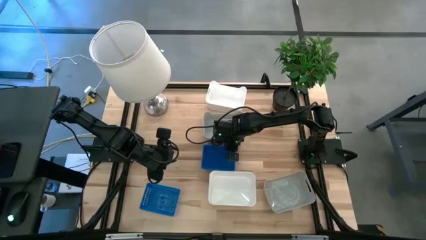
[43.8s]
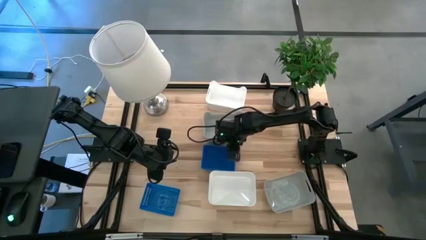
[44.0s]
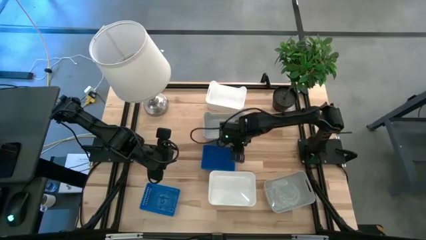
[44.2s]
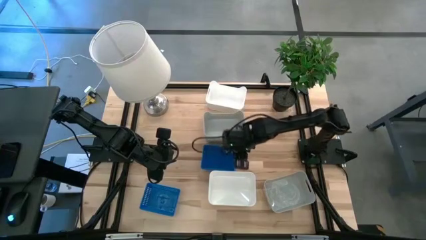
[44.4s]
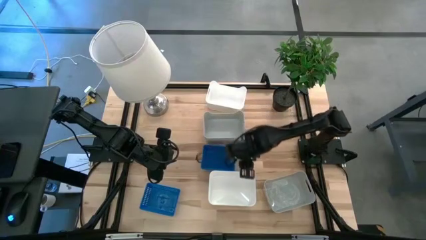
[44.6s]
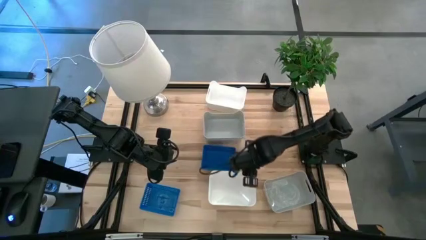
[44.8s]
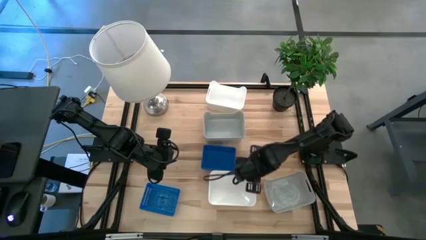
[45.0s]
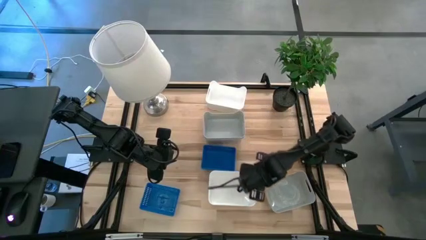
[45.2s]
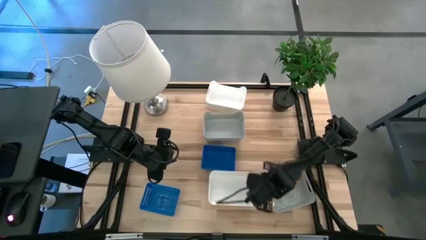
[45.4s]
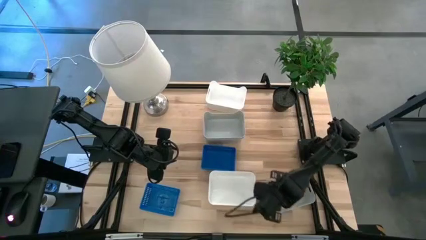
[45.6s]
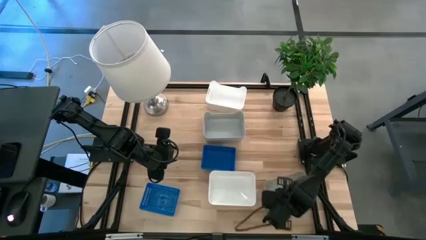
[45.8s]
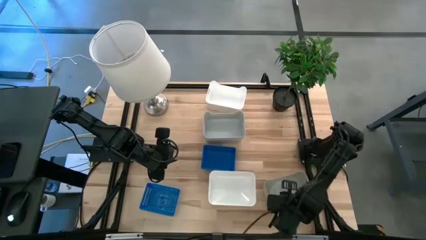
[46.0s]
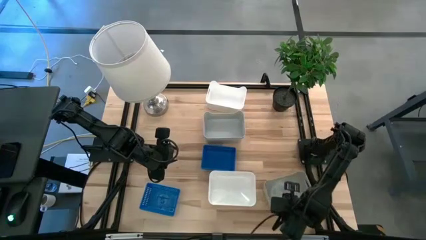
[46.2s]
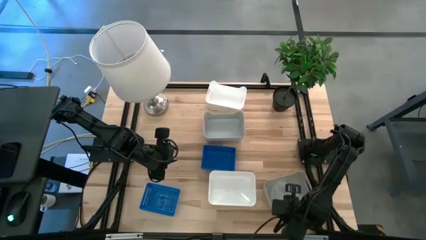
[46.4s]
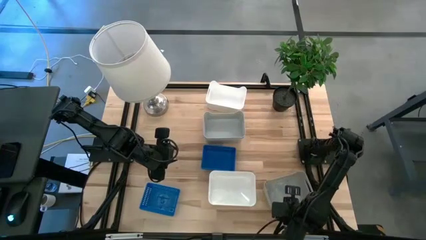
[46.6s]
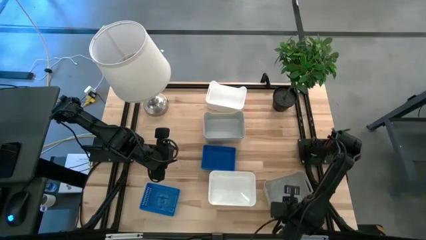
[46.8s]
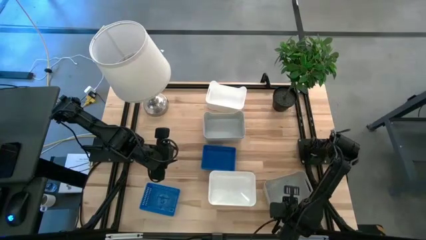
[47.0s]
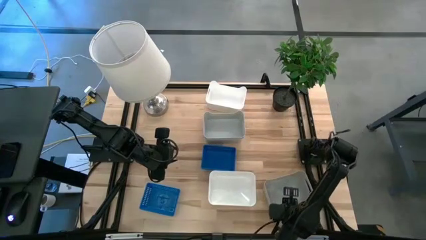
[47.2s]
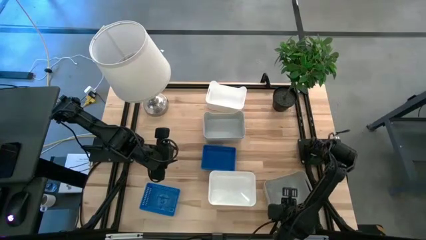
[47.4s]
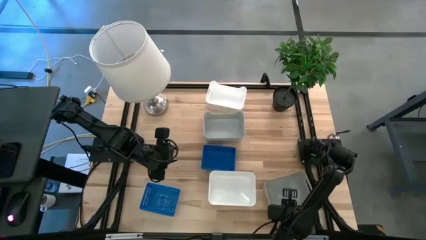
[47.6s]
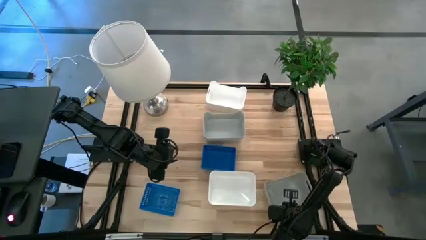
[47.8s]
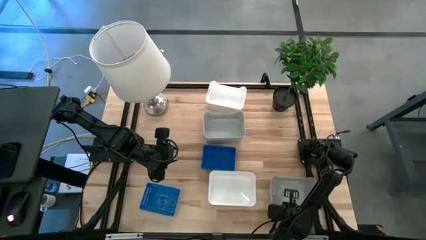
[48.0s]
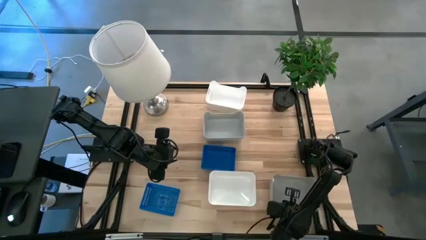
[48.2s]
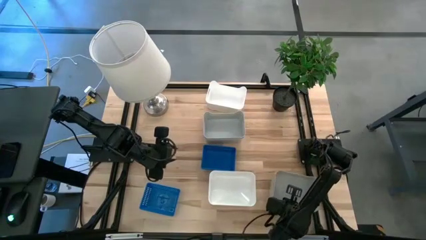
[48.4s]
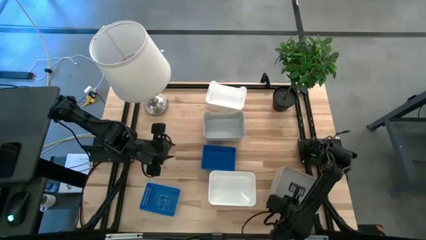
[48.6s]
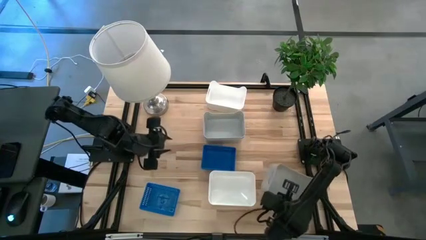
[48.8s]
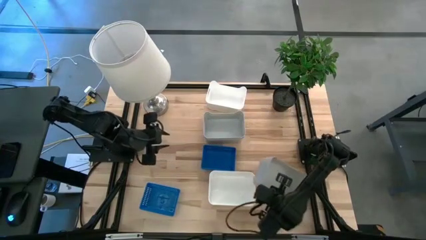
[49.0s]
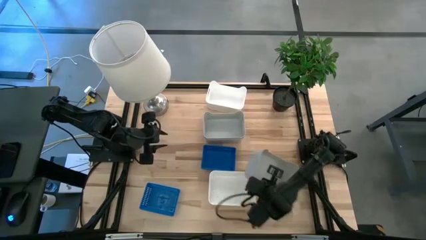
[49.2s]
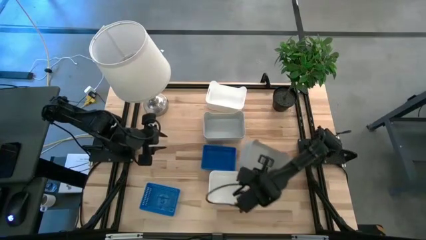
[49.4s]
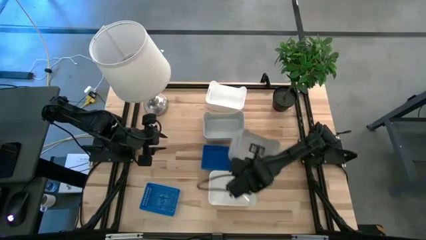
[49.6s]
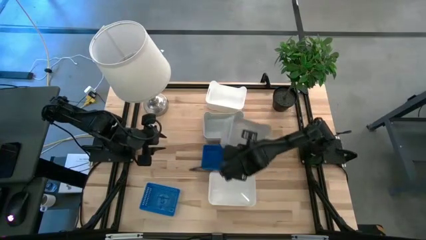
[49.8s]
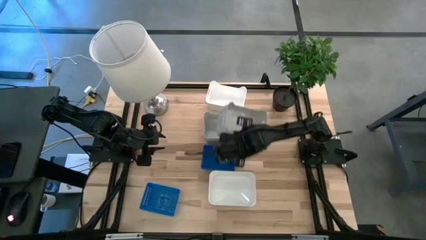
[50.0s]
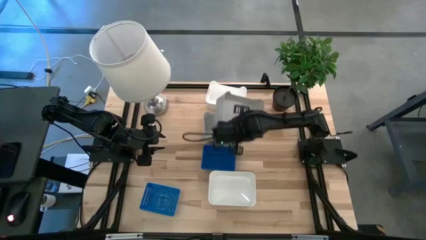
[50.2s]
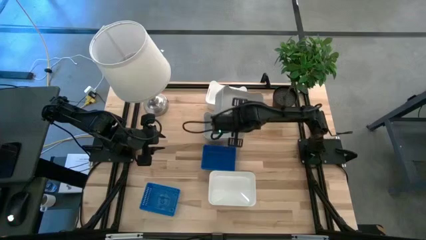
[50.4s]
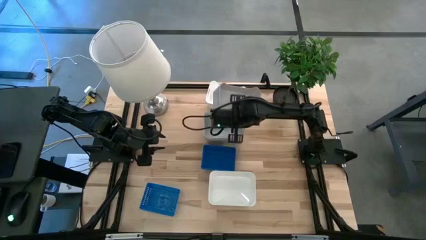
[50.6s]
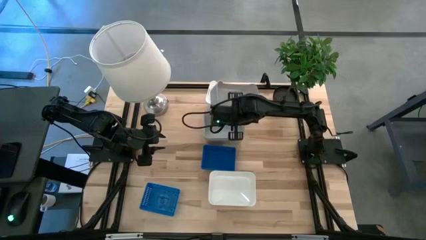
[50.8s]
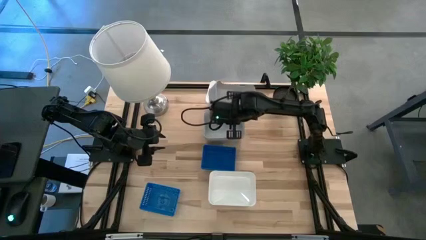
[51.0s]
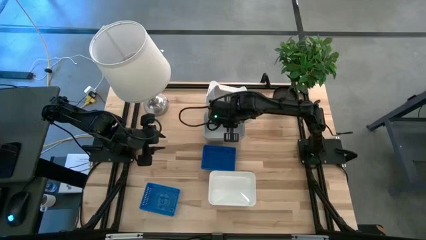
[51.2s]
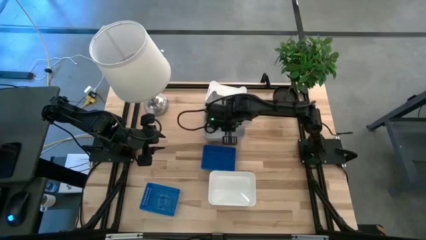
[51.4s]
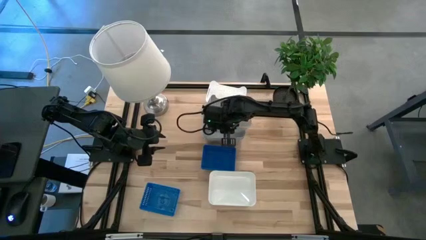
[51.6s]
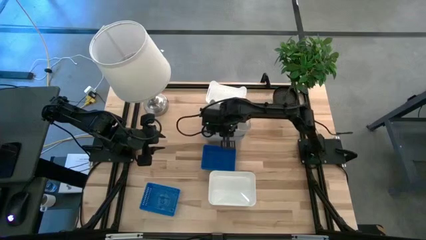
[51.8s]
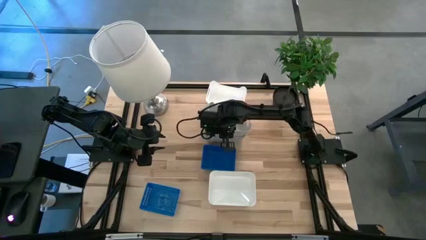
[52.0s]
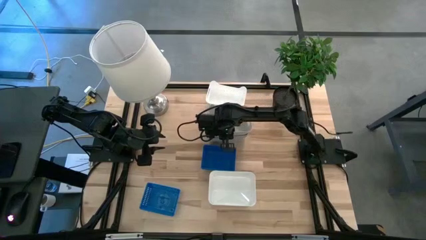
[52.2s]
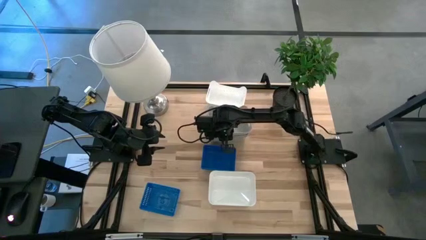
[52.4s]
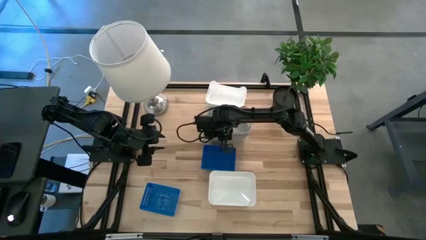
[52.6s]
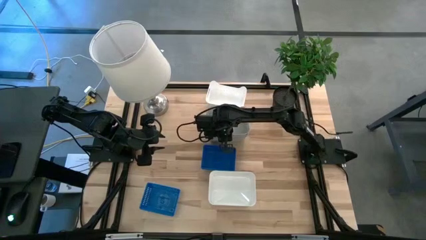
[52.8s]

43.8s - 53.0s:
Stack the bottom gray bin on the top stacked gray bin

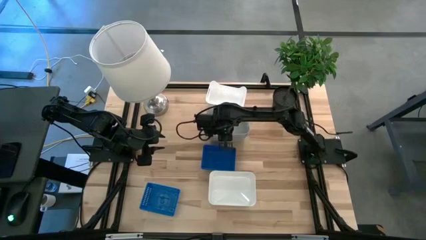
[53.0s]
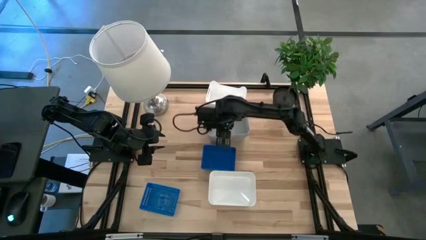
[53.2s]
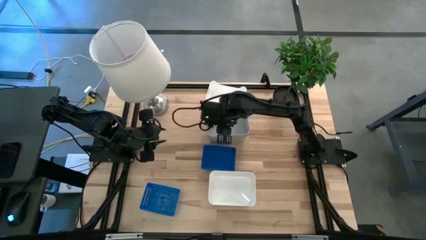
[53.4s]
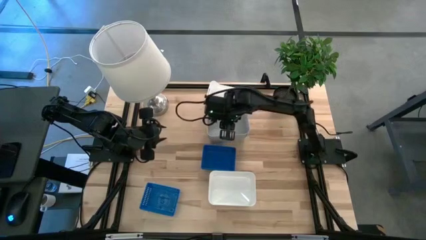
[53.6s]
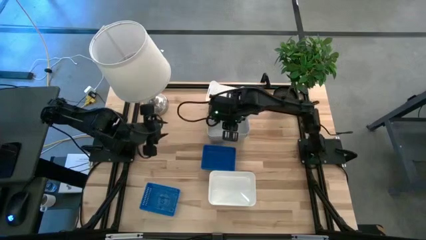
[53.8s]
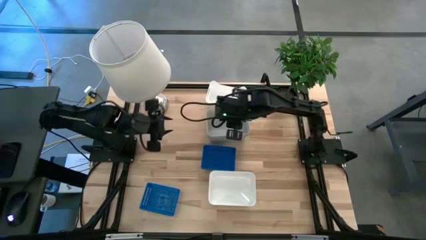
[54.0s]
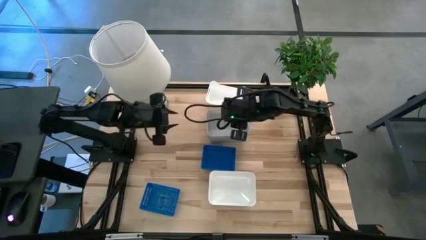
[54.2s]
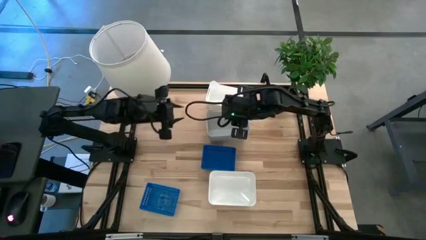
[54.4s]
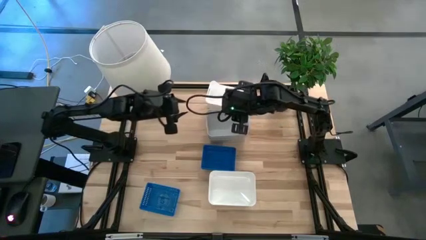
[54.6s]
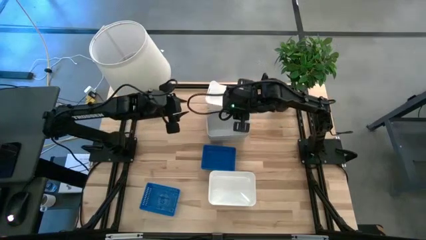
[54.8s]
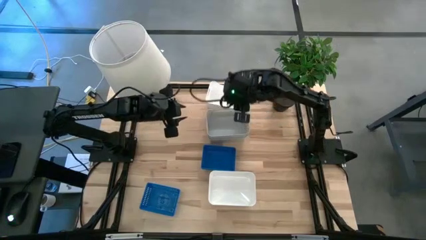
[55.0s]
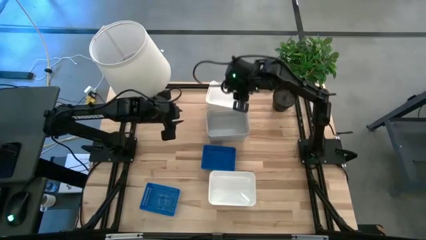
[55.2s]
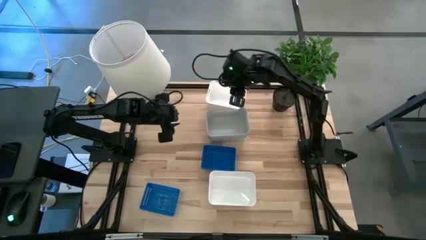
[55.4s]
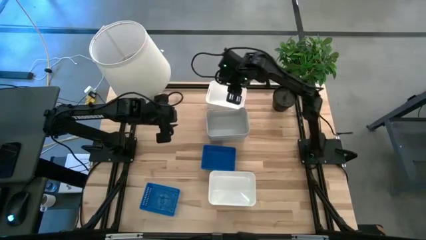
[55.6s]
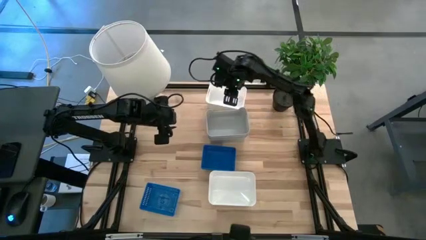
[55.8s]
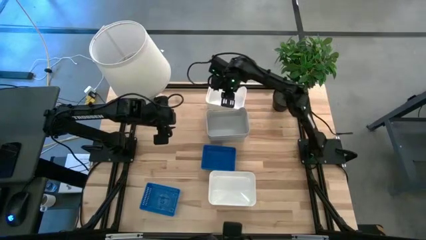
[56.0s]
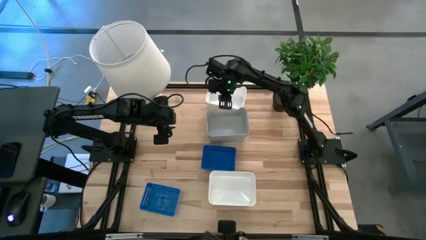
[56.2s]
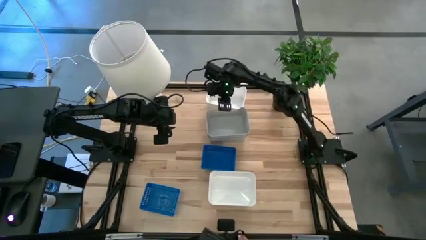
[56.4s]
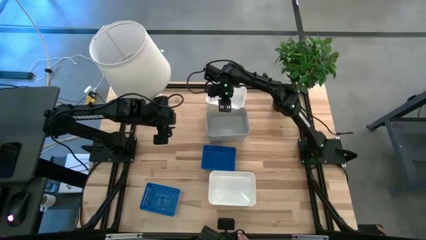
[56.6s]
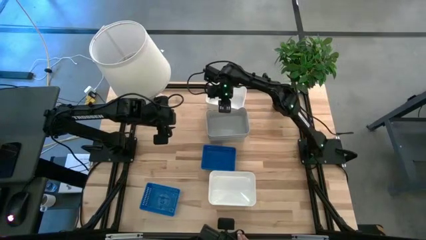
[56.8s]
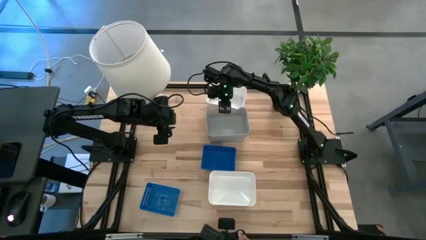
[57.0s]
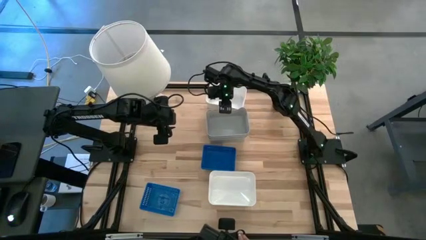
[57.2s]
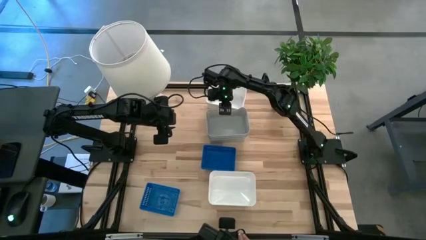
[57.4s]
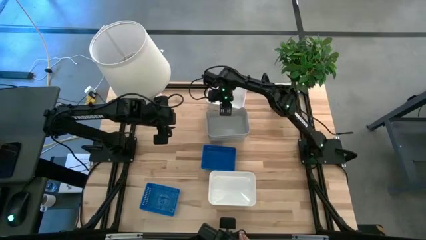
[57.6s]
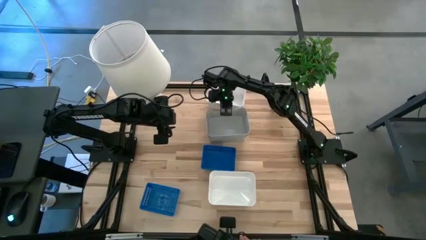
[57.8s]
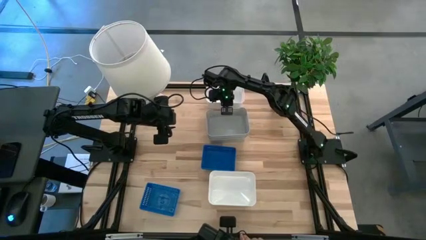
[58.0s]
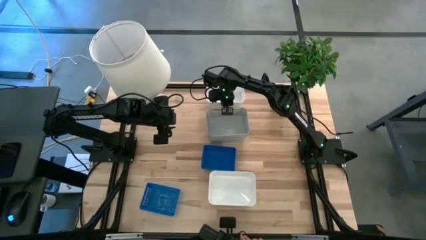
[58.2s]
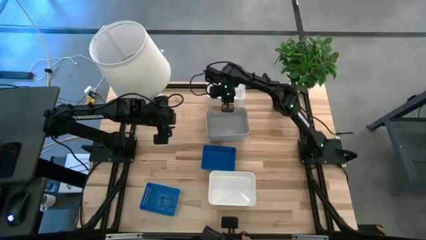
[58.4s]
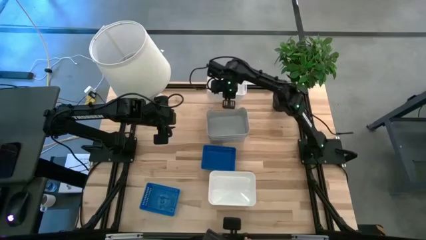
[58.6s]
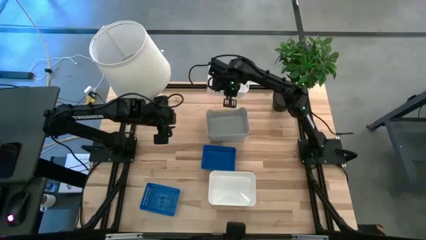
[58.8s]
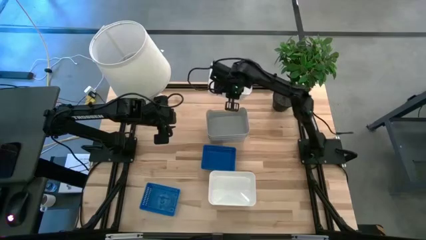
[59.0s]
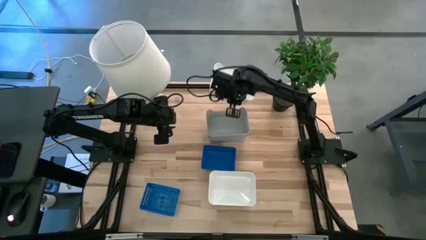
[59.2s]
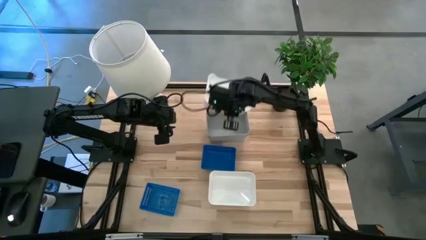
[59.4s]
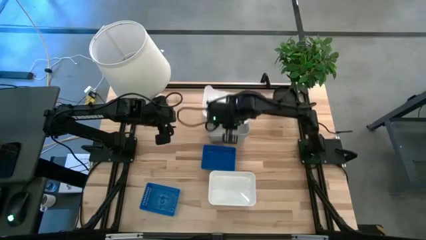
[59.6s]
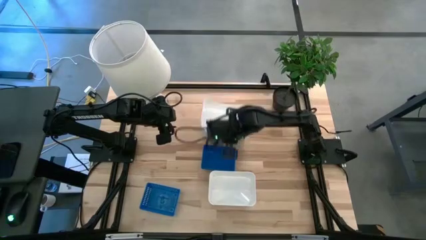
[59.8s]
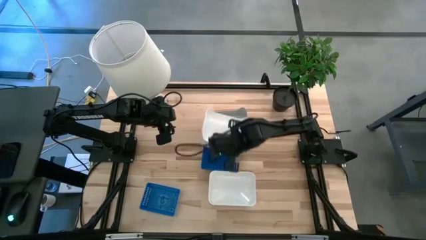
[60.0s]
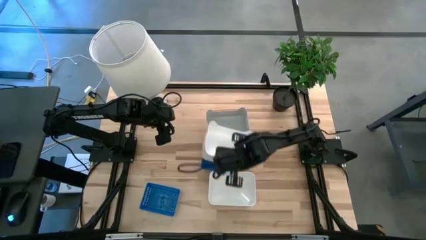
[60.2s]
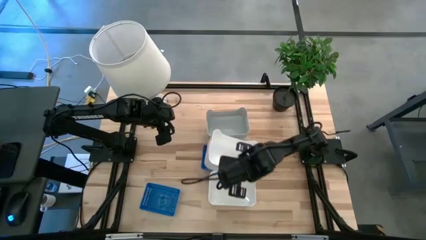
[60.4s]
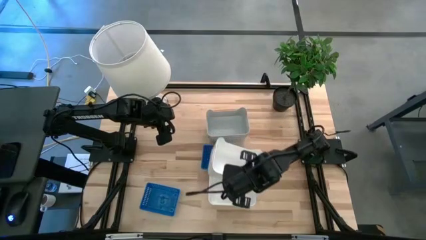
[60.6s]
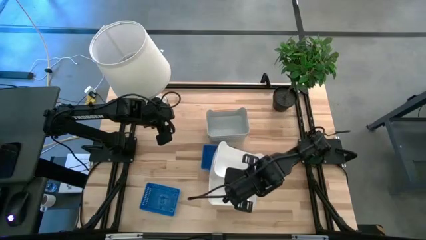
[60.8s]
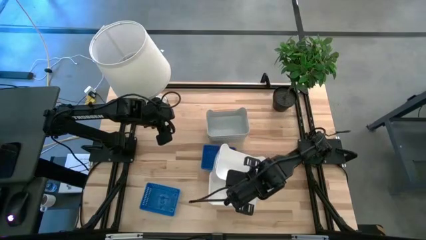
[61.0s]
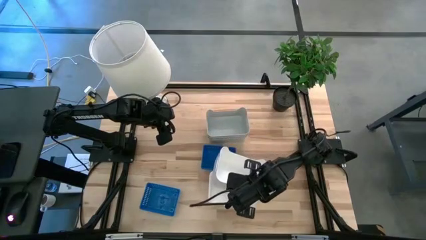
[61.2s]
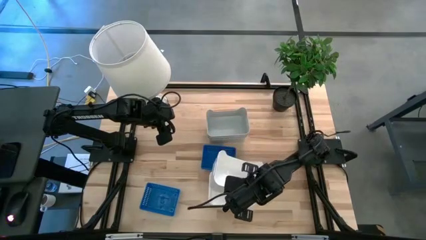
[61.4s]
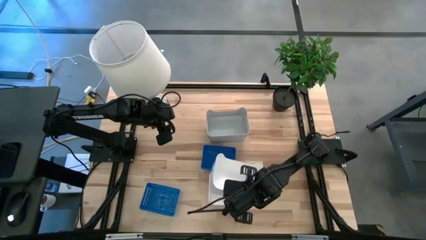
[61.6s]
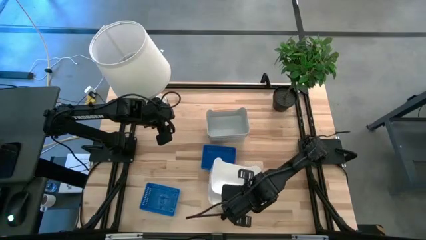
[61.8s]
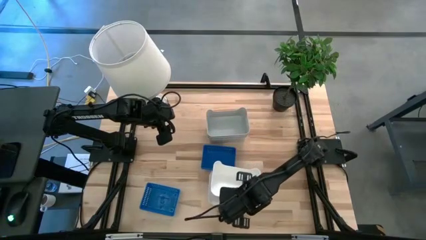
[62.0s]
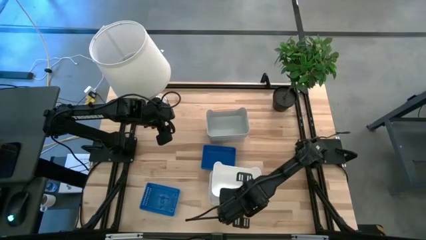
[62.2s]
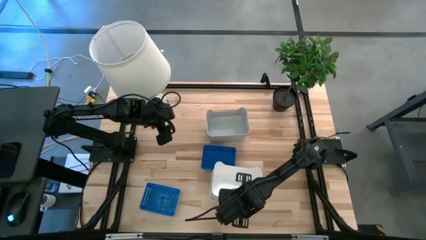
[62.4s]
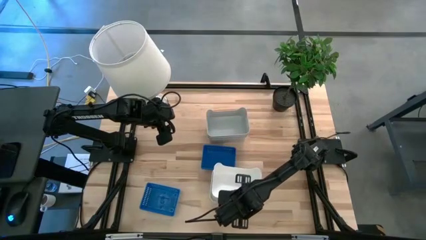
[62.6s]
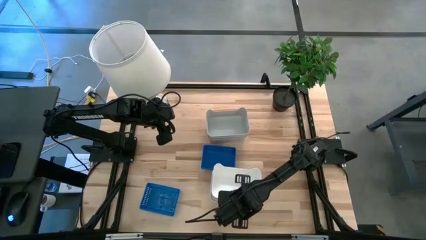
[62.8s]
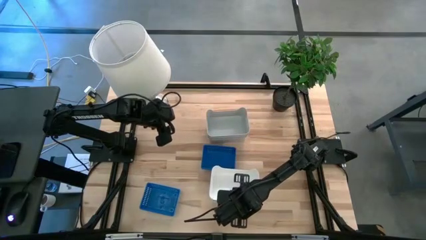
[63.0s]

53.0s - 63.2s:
Stack the top white bin on the bottom stacked white bin
